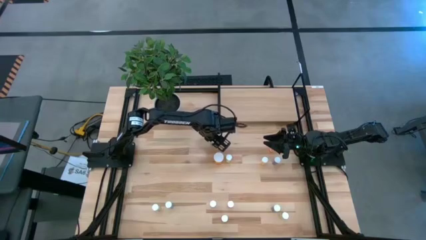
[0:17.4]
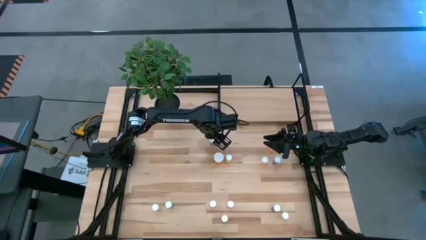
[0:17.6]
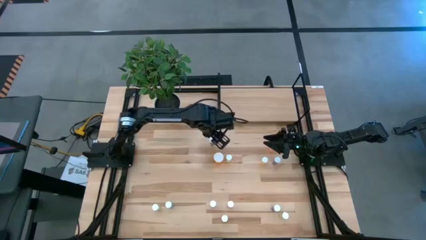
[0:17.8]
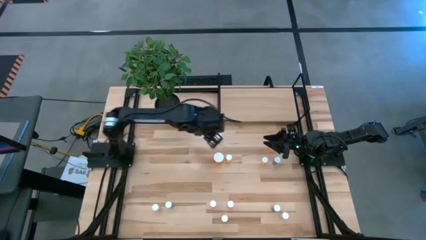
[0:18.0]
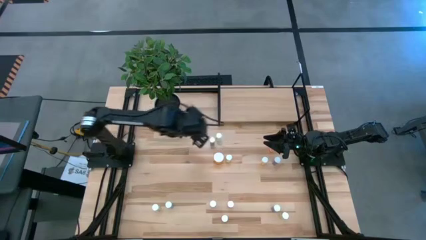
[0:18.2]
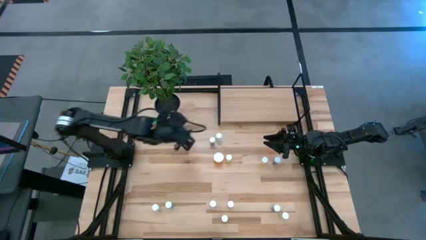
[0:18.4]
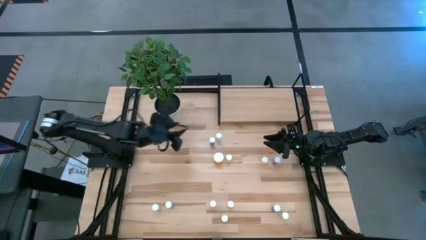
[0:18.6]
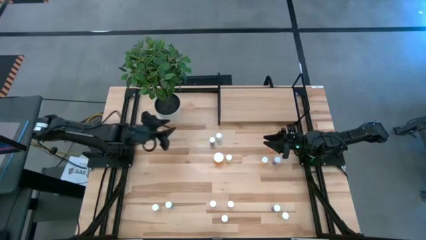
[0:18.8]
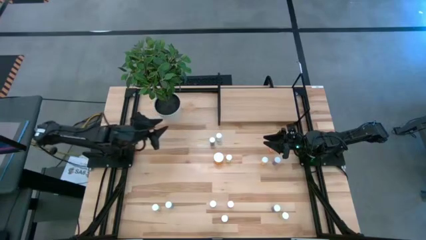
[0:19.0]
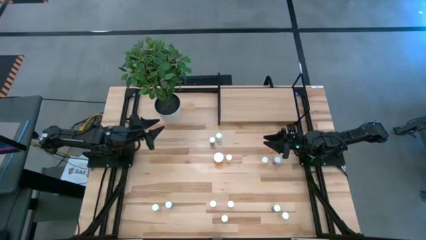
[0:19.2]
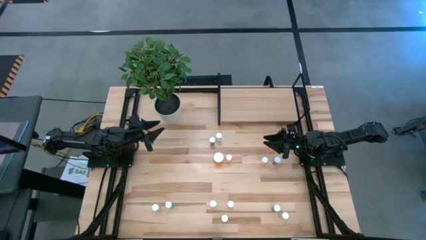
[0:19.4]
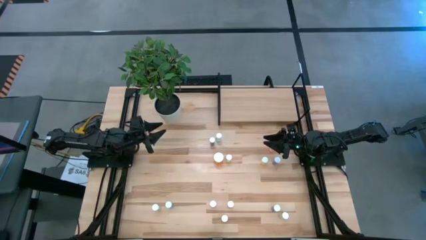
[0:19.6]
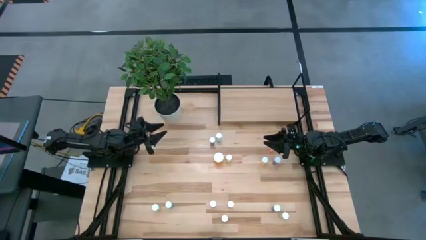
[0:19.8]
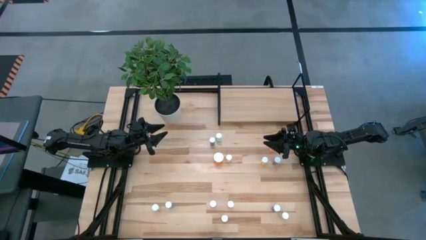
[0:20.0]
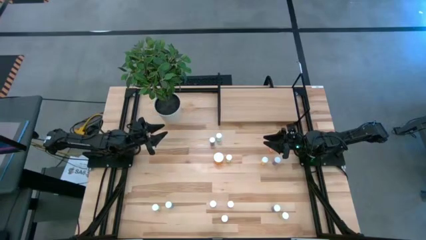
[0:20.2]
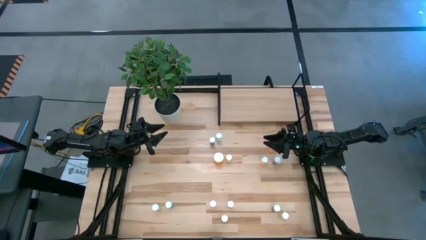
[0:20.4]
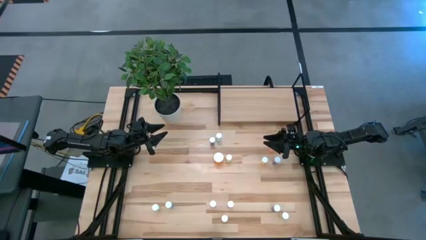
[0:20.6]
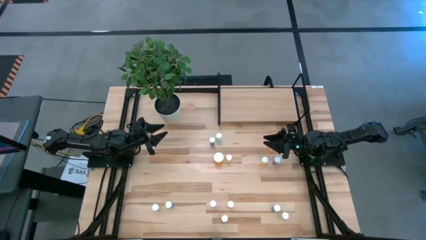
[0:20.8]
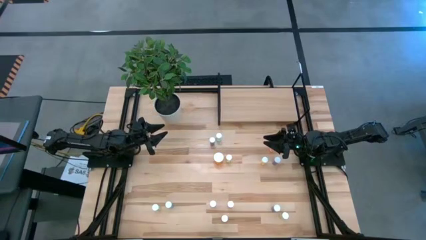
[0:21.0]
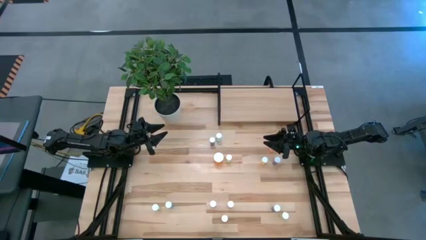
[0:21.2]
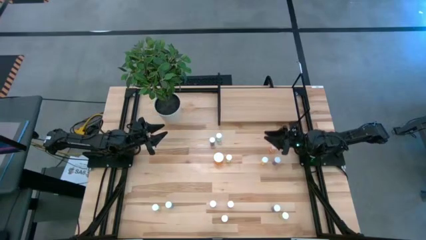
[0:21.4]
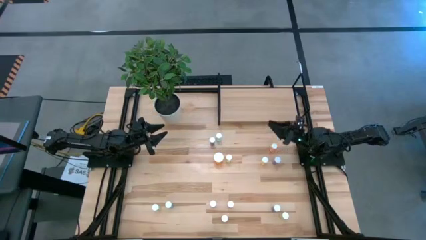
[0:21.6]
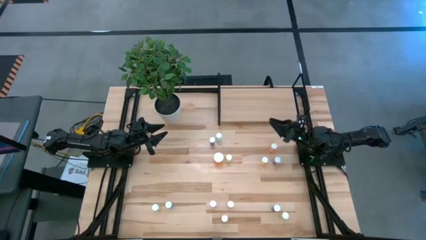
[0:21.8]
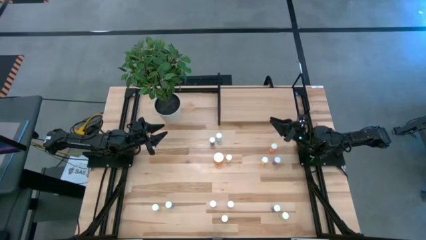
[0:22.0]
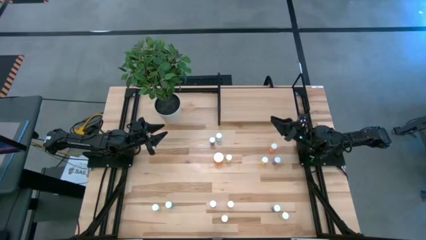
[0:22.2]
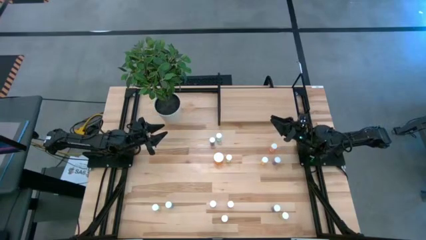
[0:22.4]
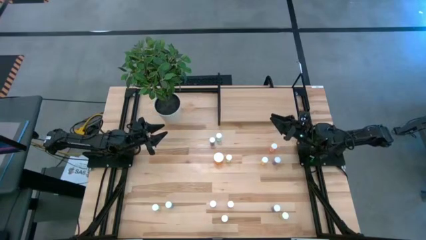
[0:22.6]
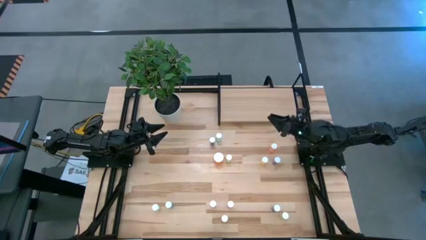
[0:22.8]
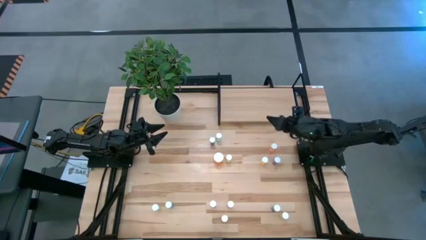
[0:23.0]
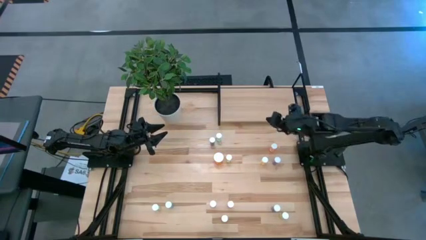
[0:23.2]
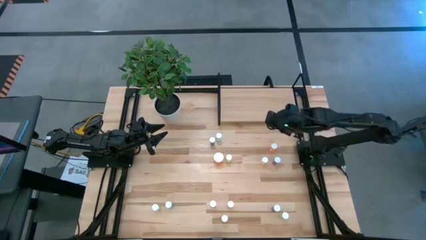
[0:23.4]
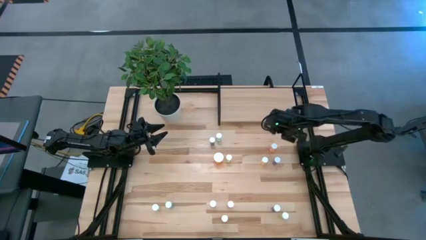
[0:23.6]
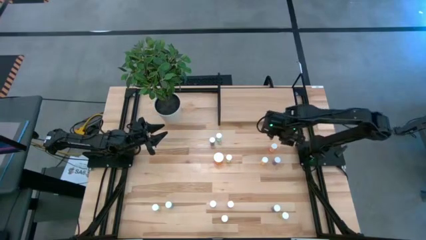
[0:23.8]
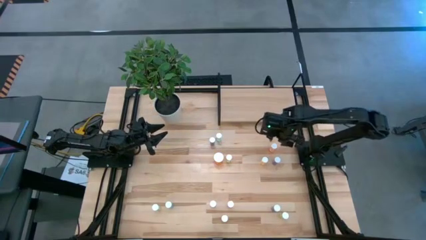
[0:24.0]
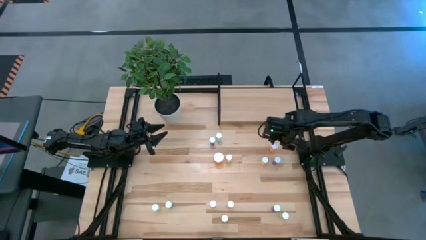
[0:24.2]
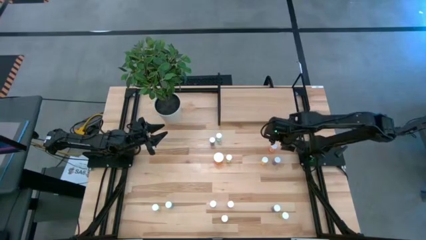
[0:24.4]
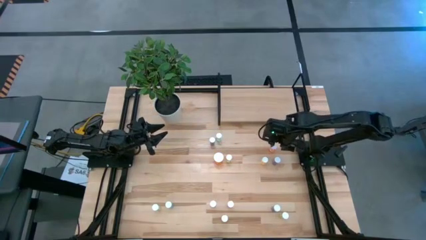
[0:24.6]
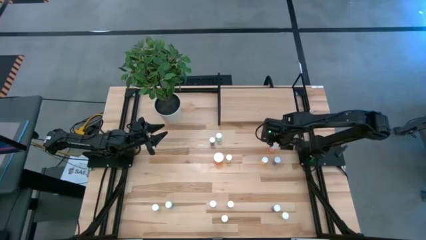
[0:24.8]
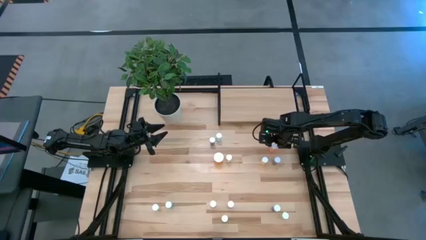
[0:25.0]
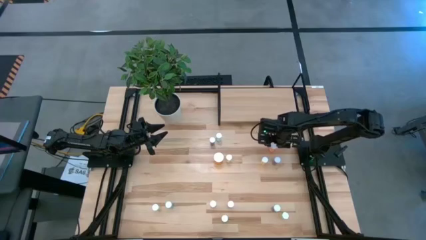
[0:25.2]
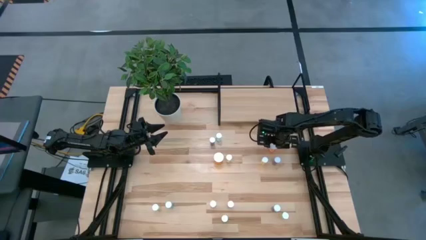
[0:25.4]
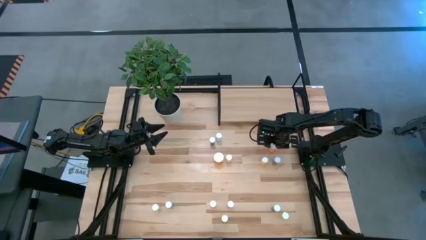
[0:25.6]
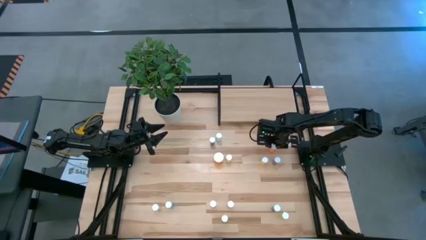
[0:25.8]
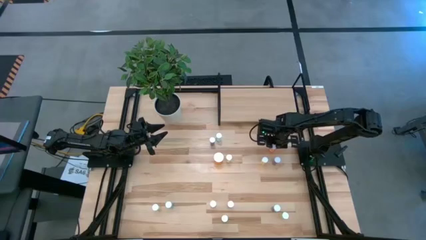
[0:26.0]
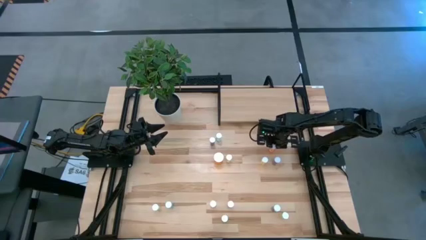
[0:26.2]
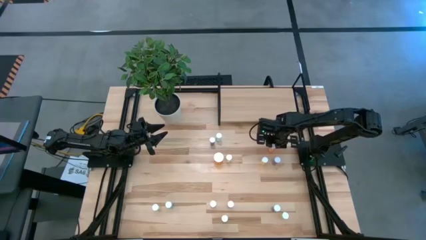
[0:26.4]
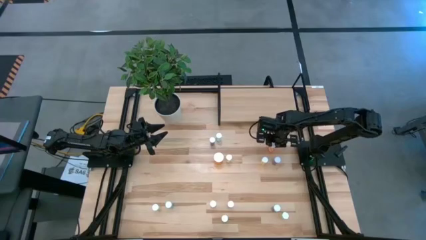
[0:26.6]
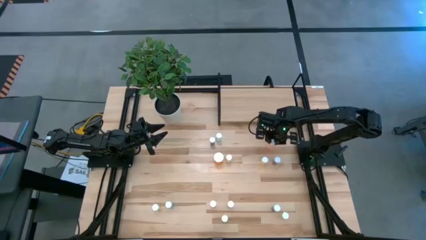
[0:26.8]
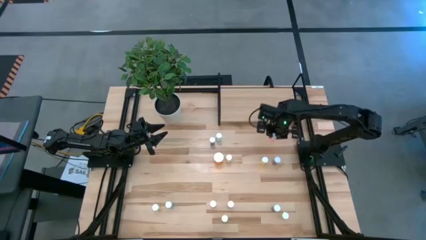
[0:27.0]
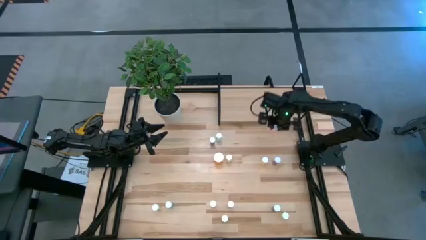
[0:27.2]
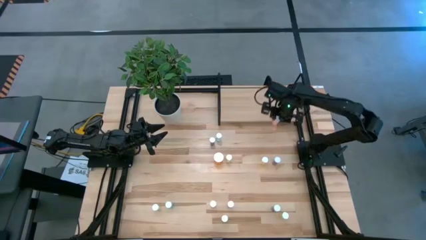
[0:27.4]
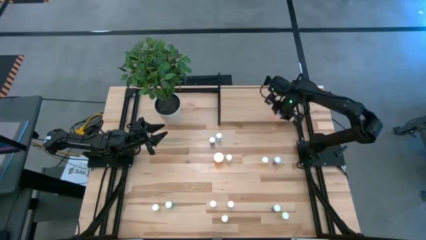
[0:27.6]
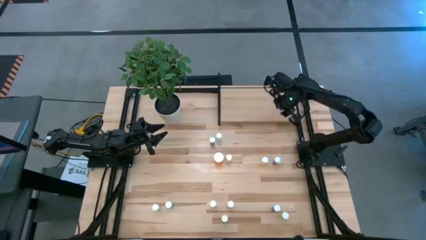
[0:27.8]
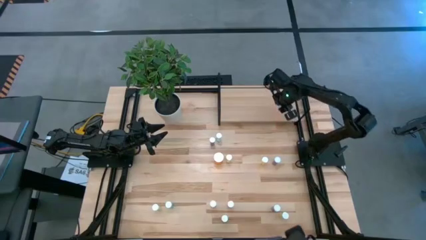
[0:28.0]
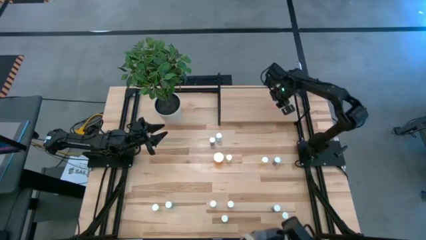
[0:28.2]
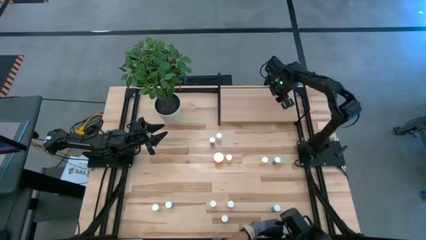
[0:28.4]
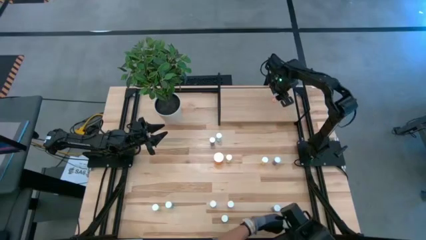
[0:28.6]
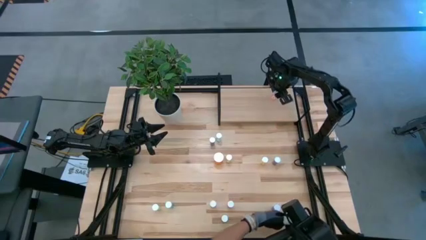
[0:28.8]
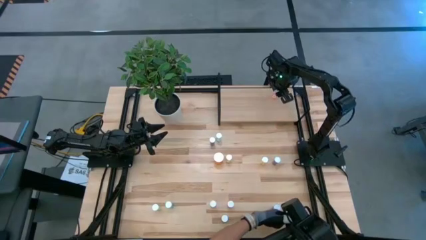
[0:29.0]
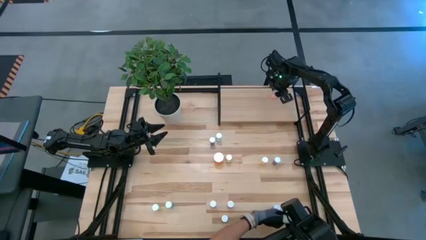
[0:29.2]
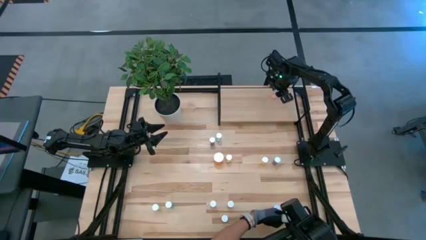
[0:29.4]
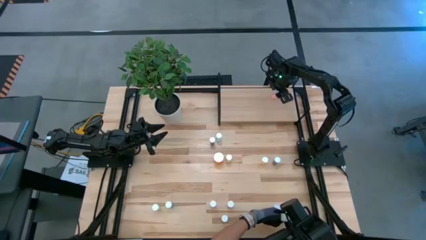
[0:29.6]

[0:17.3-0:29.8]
Task: Pick and place medicine bottles onto shelf by color
Put the right orange pill bottle on the shelf

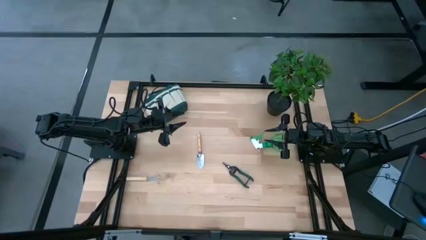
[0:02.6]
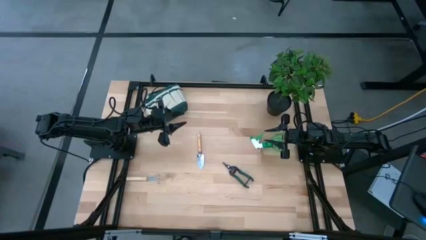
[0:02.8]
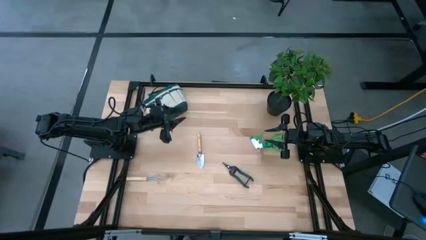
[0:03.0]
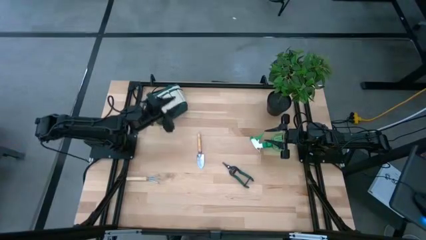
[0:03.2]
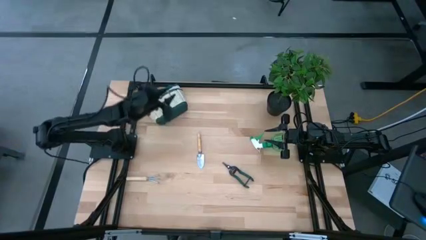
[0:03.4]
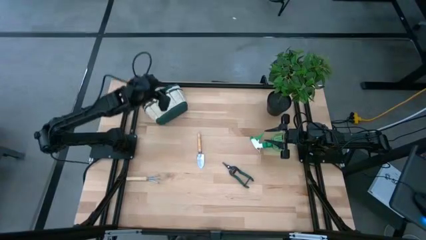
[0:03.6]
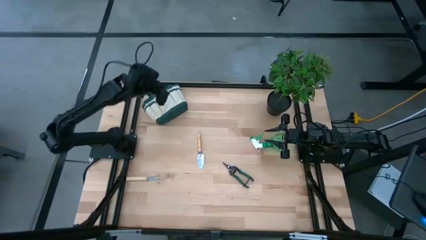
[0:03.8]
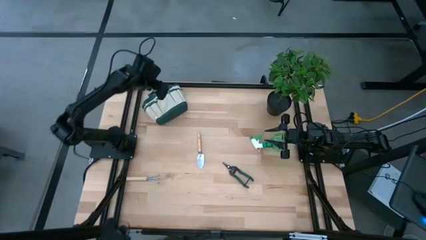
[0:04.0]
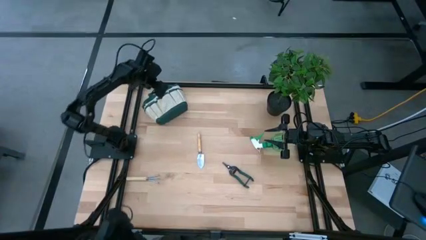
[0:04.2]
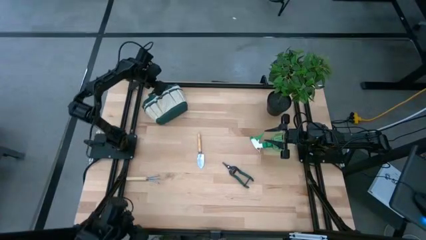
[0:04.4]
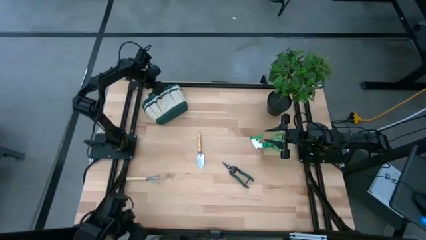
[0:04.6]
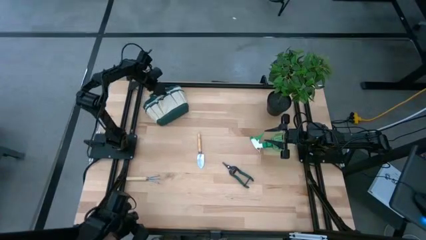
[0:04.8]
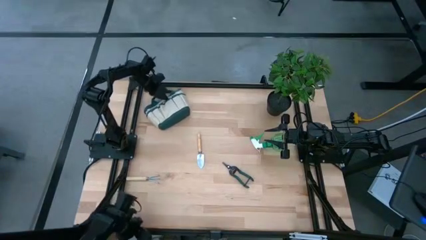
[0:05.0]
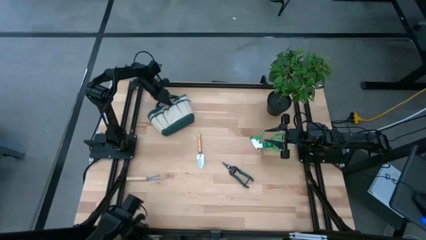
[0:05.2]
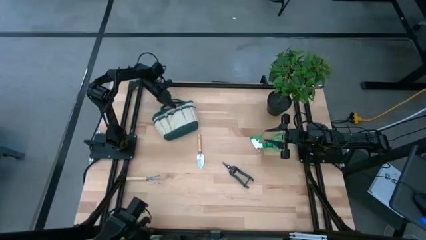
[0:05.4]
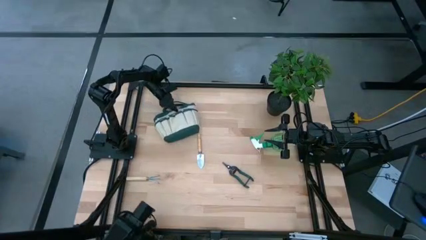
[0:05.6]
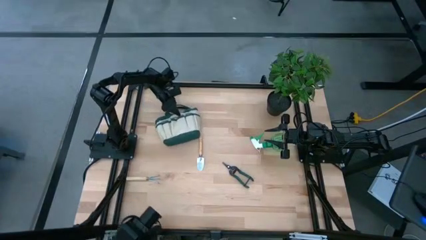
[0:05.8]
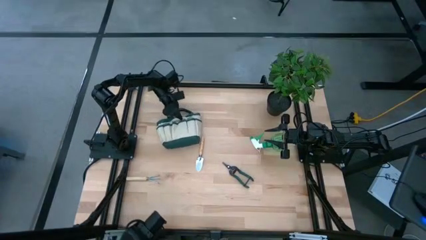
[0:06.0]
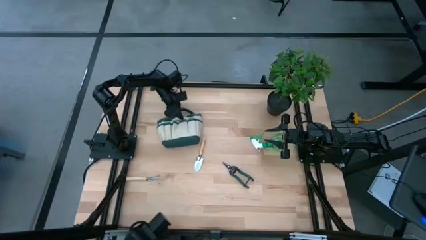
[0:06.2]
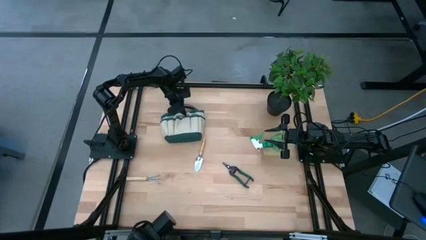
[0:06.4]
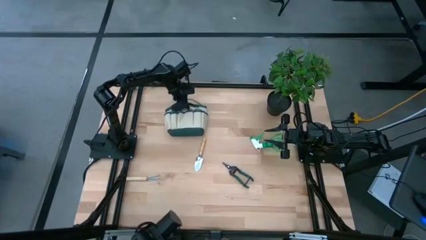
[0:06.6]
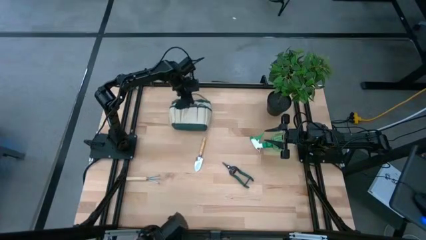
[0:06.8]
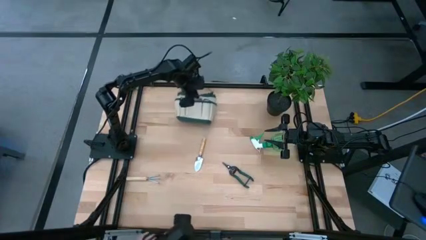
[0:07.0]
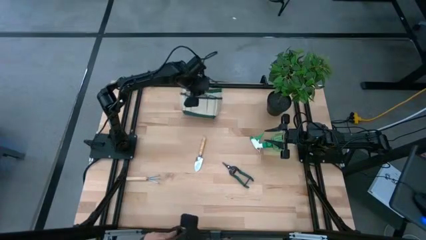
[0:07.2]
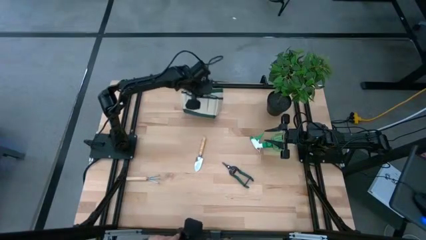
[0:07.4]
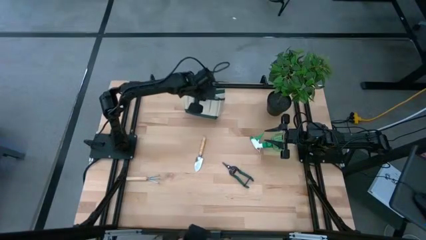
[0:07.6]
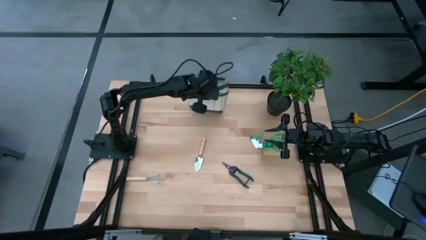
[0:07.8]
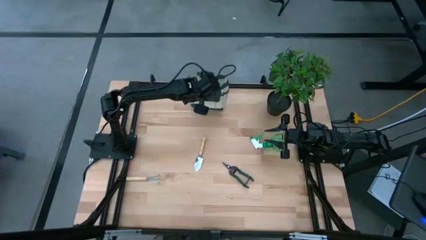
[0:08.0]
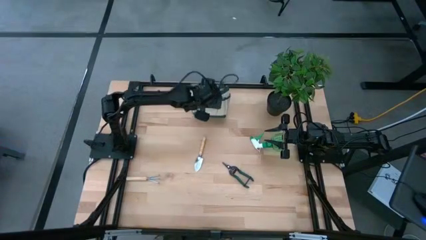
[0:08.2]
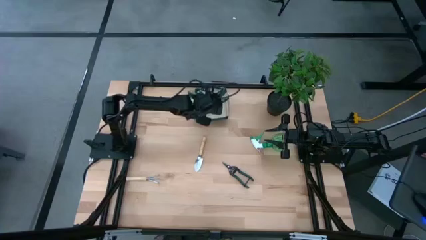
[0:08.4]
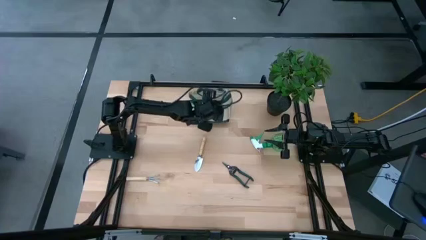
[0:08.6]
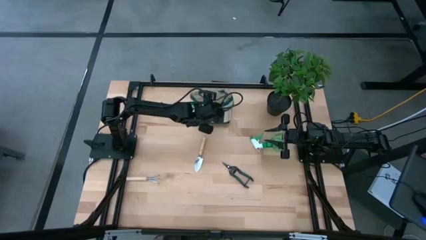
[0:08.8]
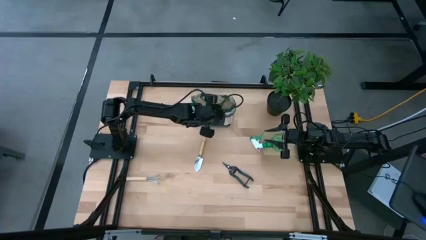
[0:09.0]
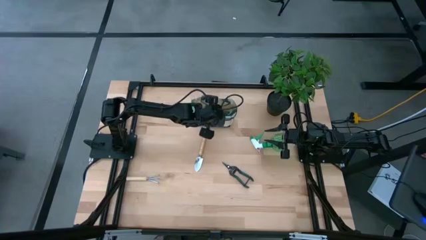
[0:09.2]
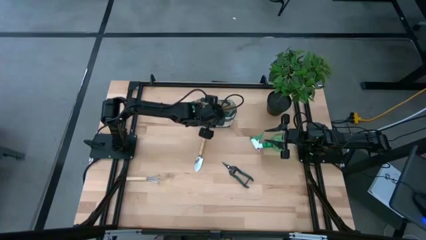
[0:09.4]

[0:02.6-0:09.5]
Task: Pick & Place Garden tools in Gardening bag
Prepare the light brown gardening bag
